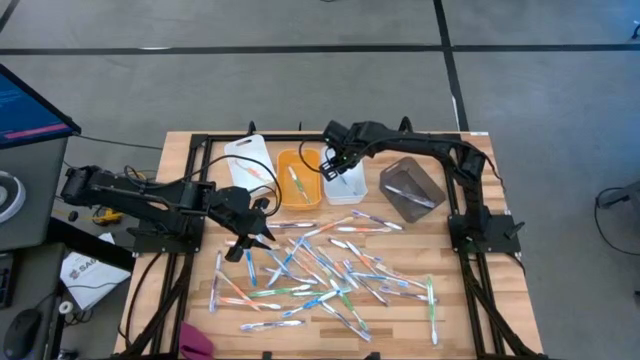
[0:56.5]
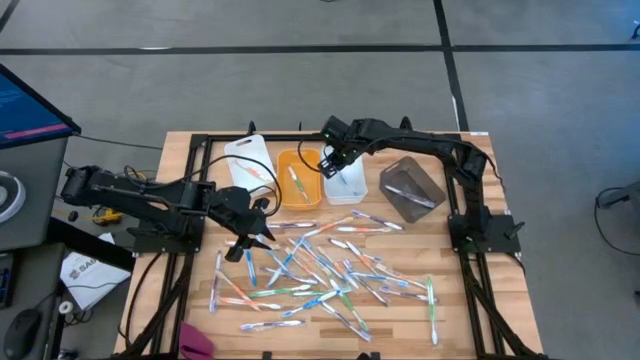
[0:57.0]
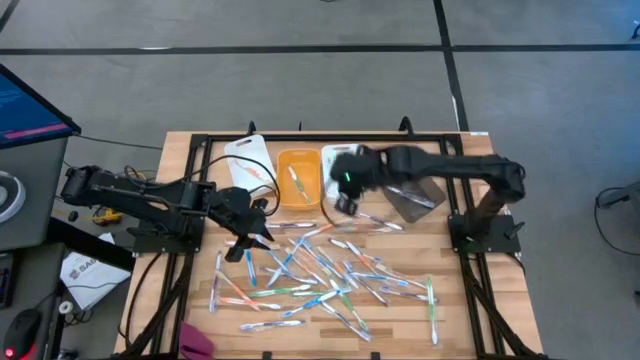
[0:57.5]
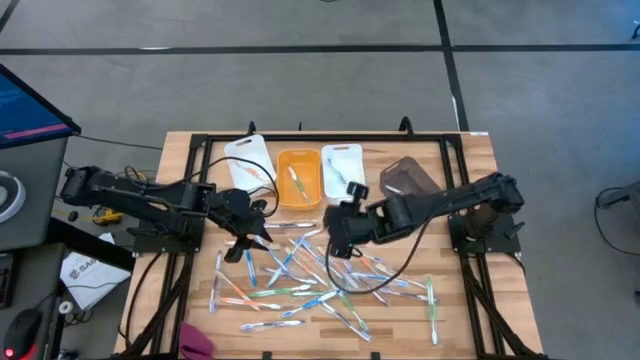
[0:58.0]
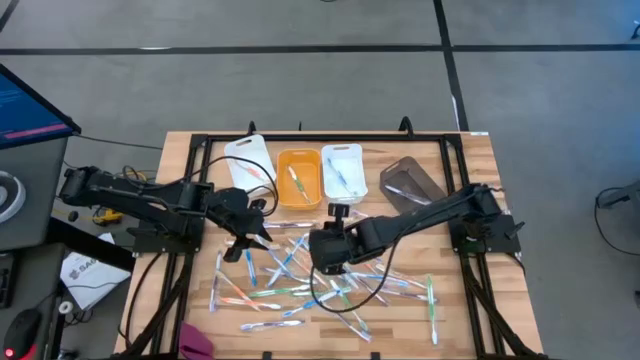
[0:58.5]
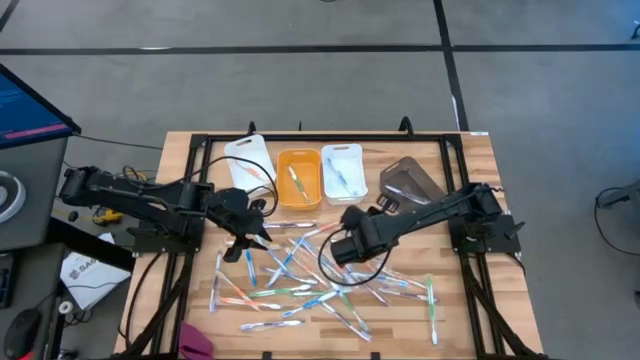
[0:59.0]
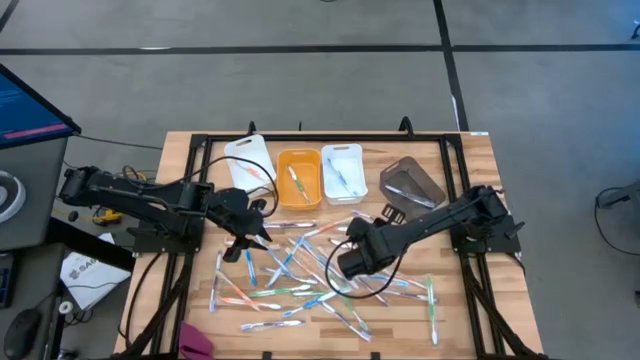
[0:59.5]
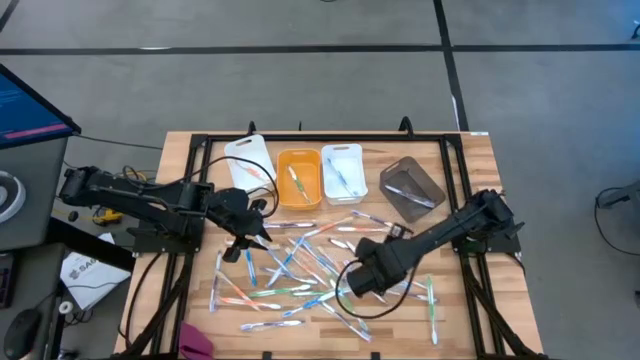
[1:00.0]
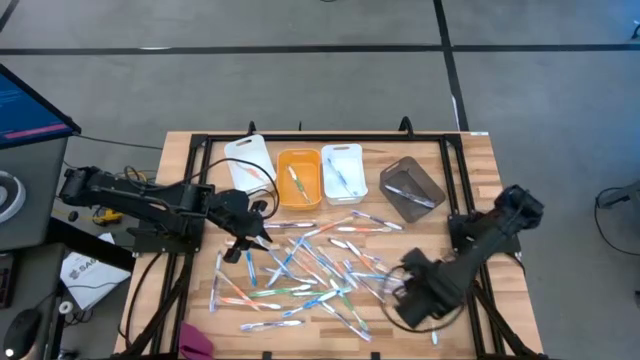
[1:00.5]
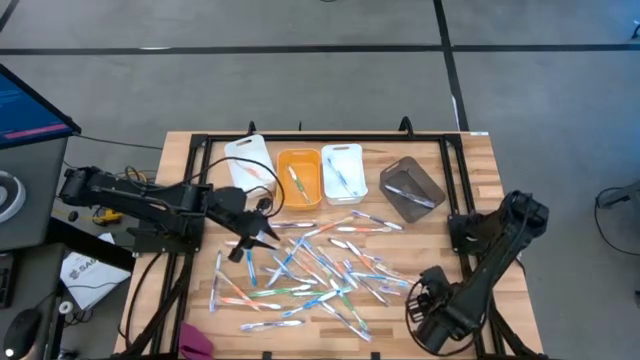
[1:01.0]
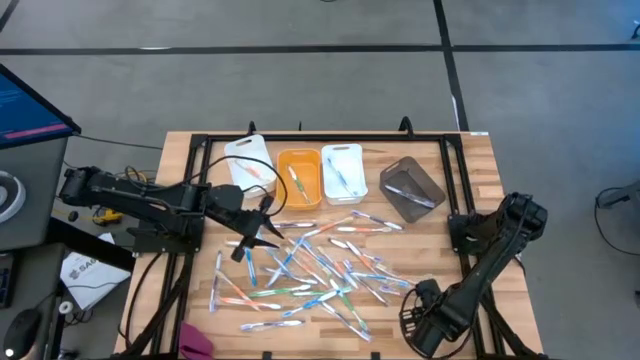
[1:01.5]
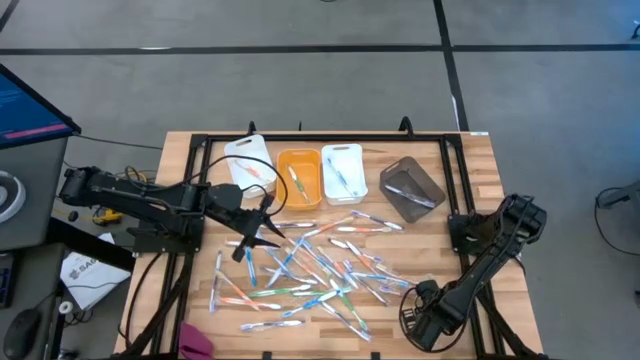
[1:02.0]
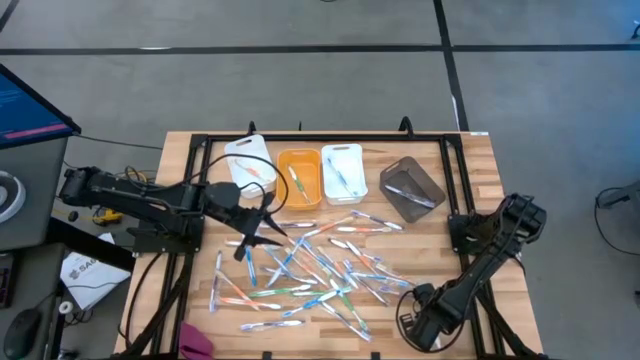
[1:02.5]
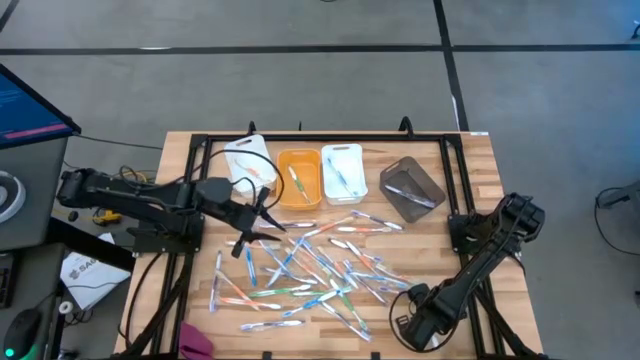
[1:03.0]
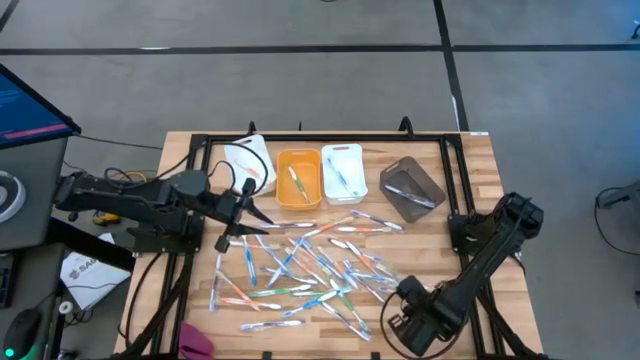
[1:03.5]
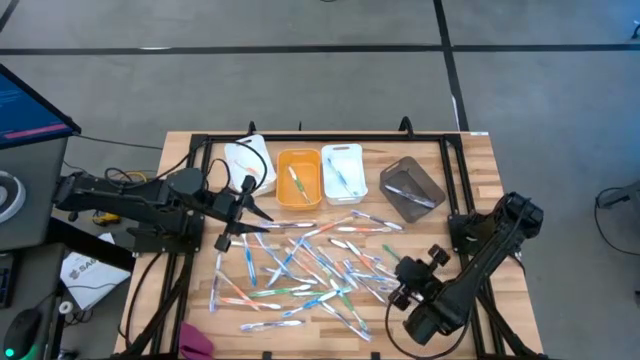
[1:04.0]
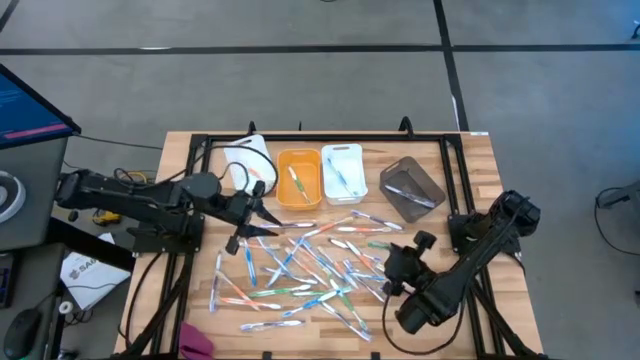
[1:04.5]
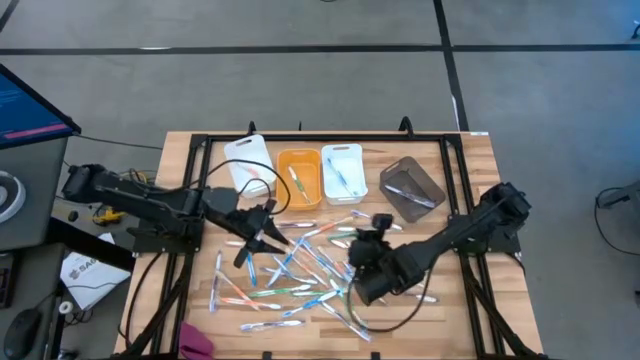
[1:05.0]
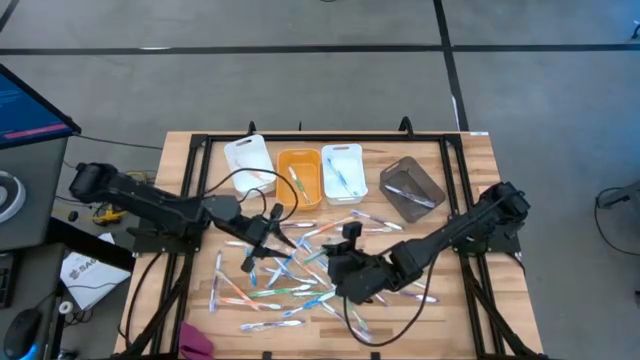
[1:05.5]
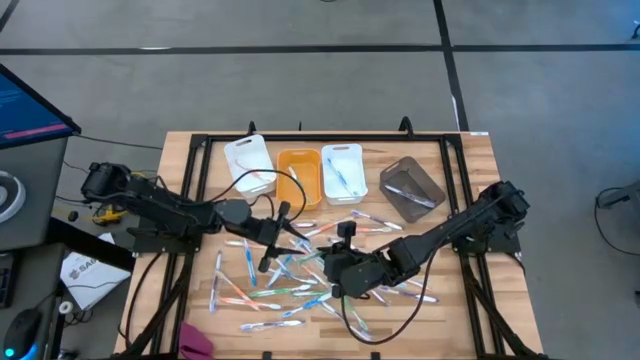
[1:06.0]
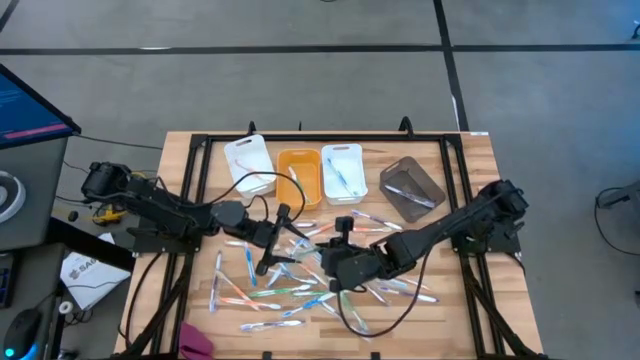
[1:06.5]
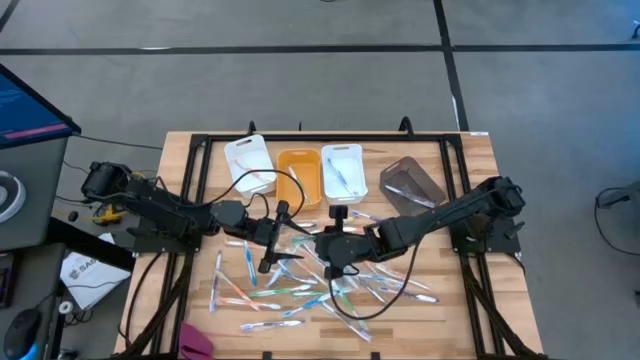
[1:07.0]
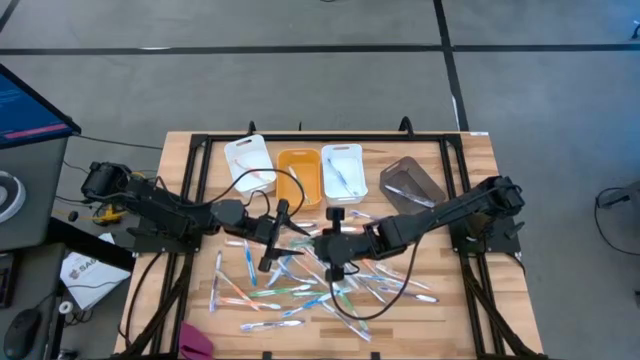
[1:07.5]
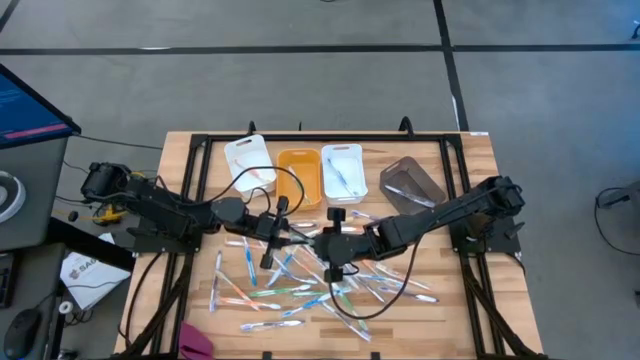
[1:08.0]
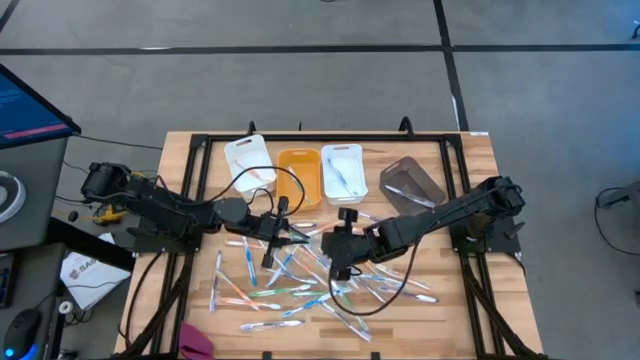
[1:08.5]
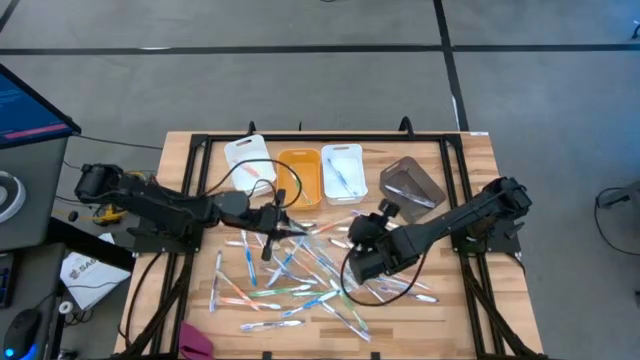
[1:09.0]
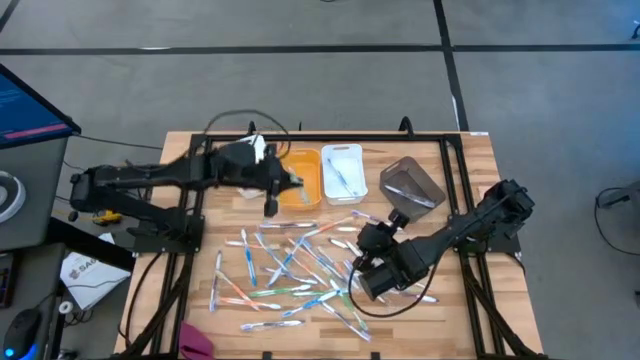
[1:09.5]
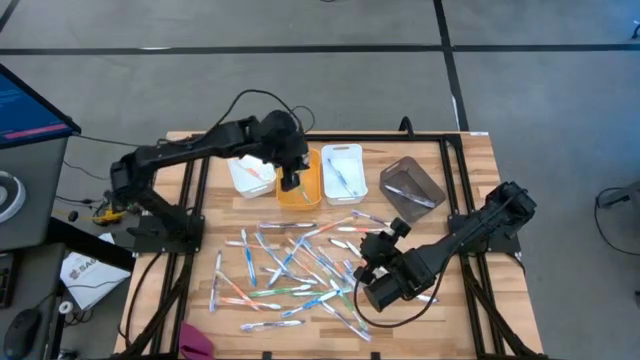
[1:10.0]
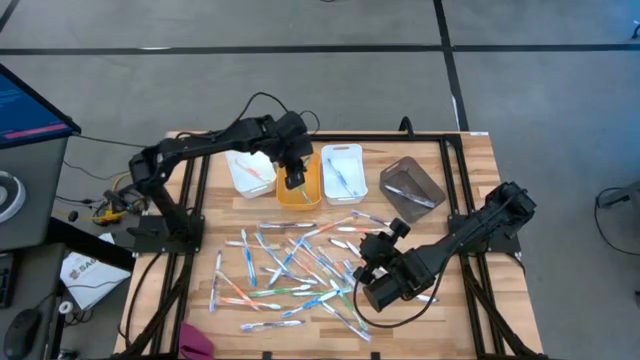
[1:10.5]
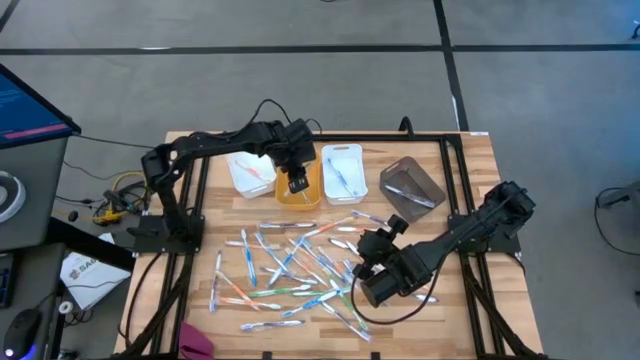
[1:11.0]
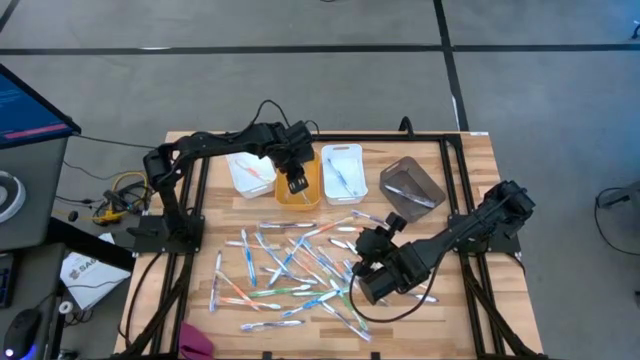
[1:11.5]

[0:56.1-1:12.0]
Task: Pick & Place Toothbrushes
Put the white green toothbrush into the yellow bin

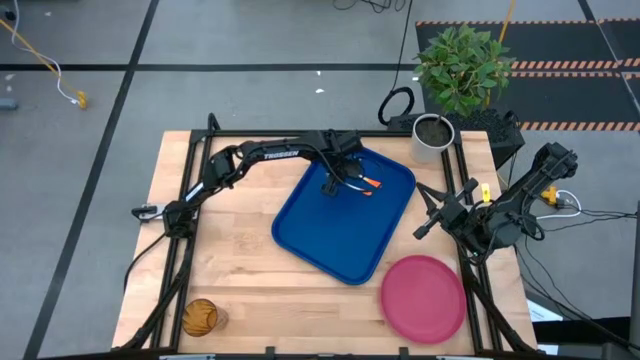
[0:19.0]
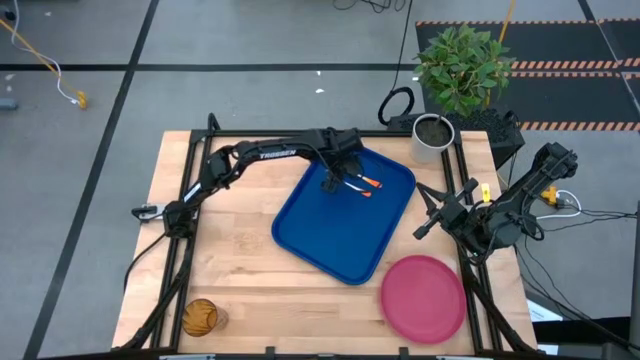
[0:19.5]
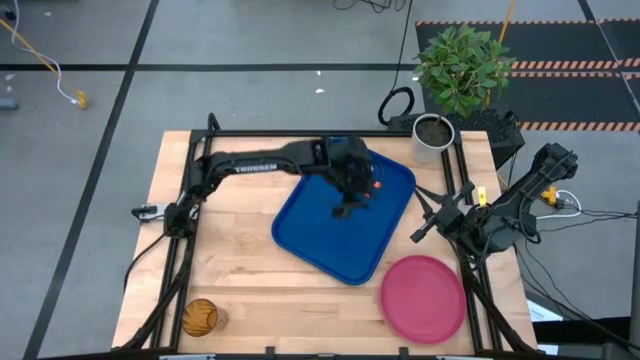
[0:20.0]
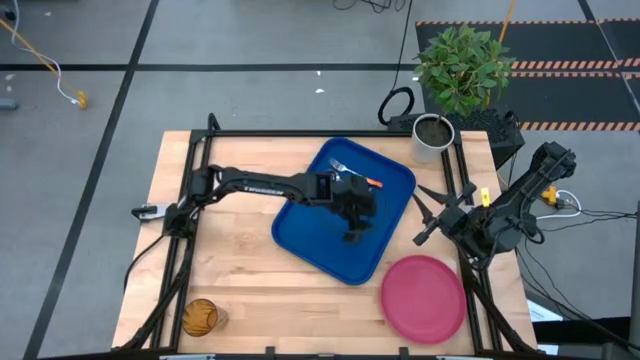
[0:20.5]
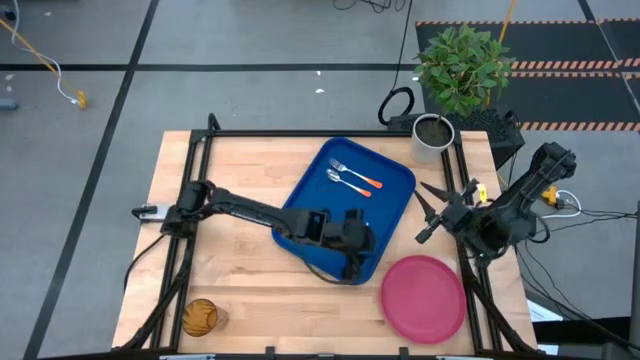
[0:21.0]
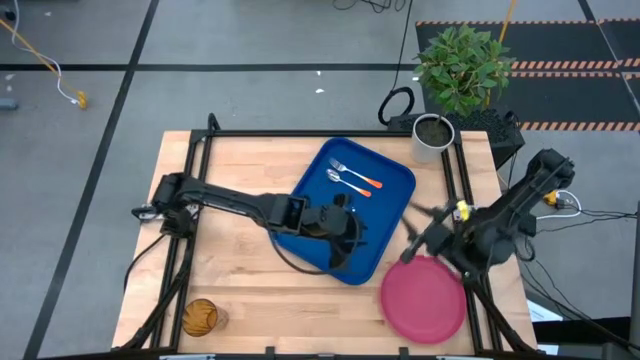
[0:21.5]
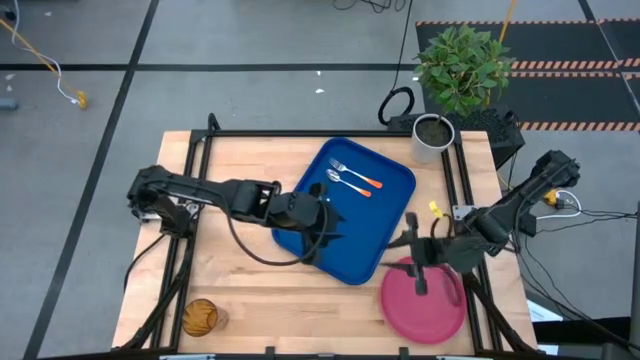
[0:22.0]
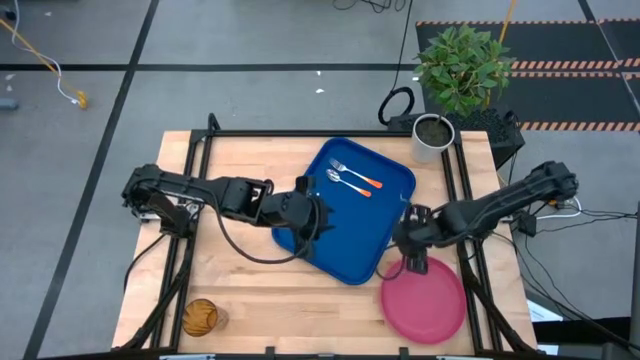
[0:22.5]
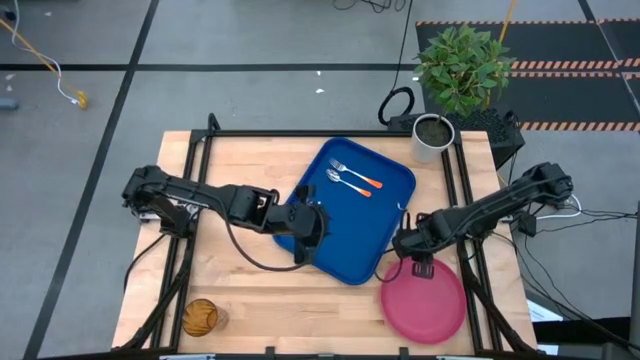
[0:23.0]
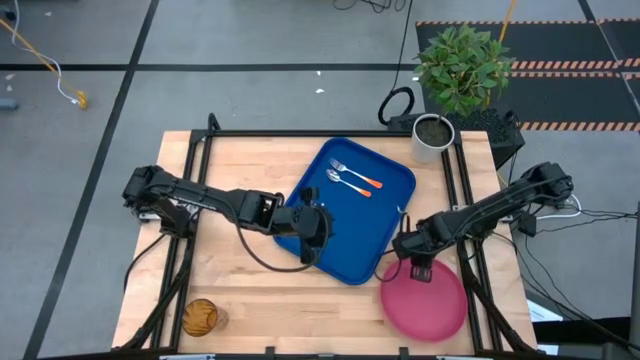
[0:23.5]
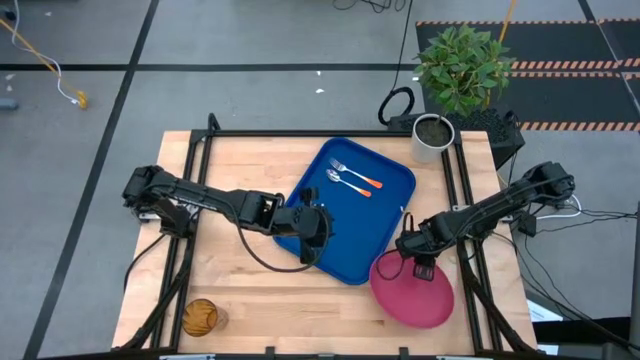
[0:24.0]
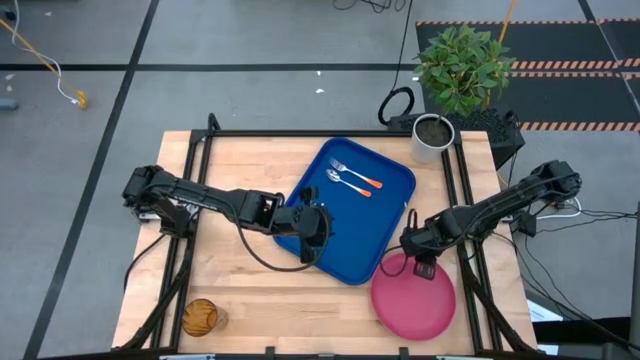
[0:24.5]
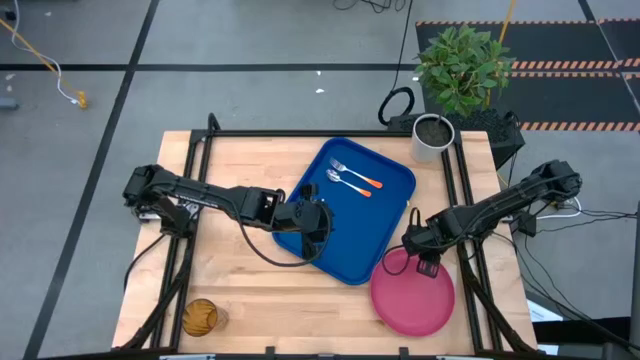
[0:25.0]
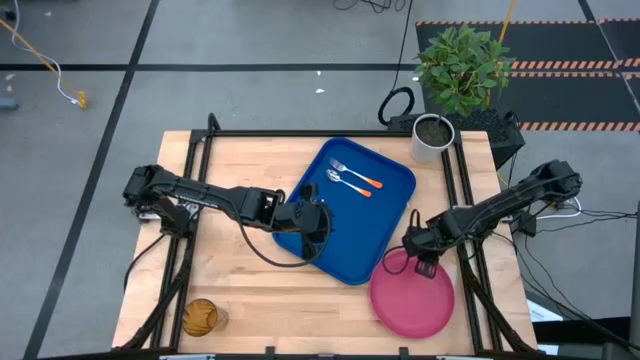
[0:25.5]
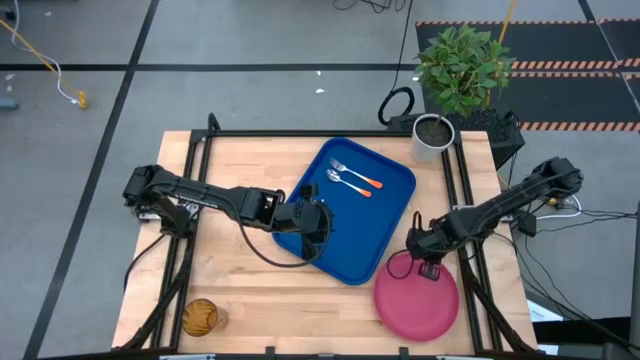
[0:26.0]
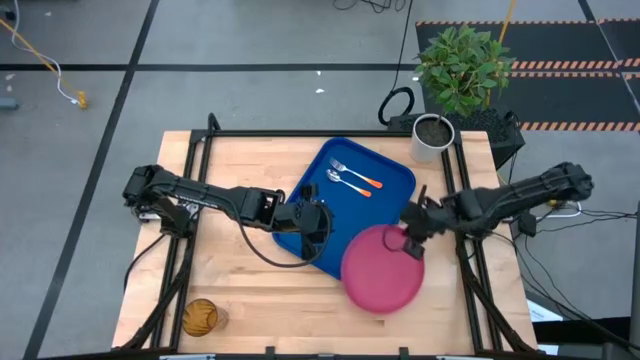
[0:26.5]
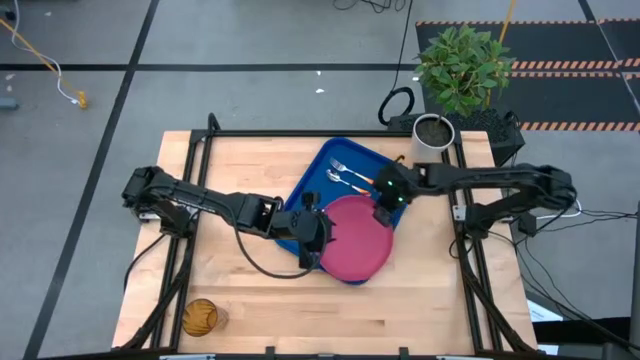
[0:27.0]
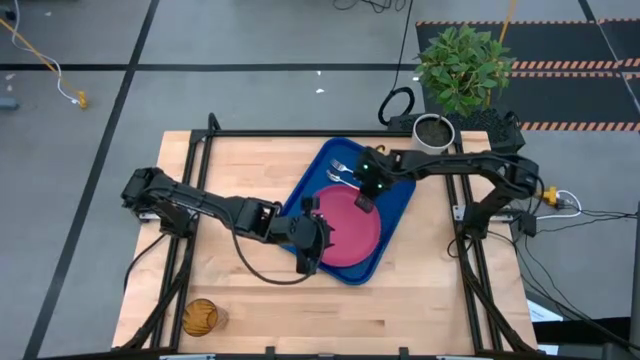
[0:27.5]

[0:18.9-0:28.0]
Task: Pick and place plate/cup/fork/spoon on tray
Put the pink plate on the blue tray at the bottom side of the spoon
